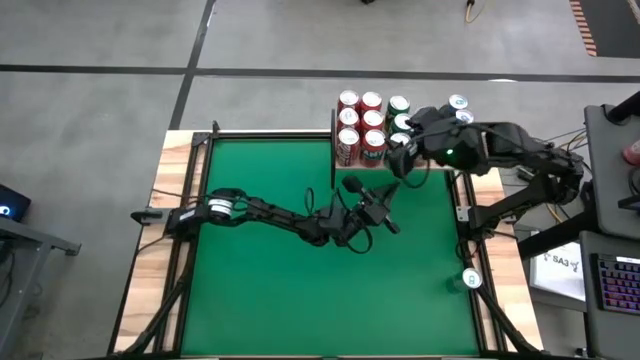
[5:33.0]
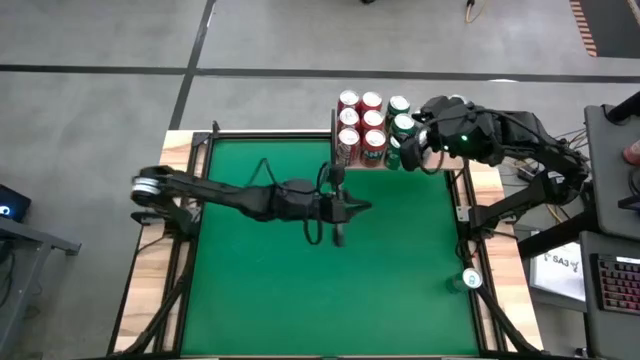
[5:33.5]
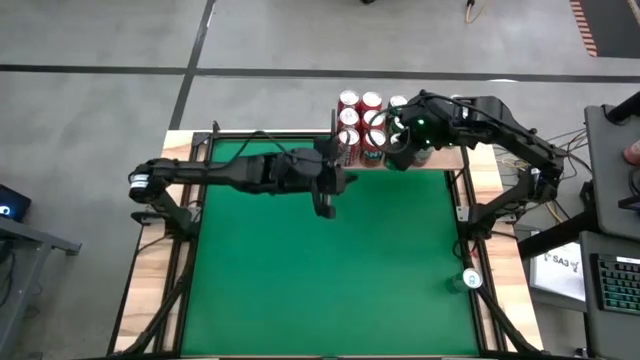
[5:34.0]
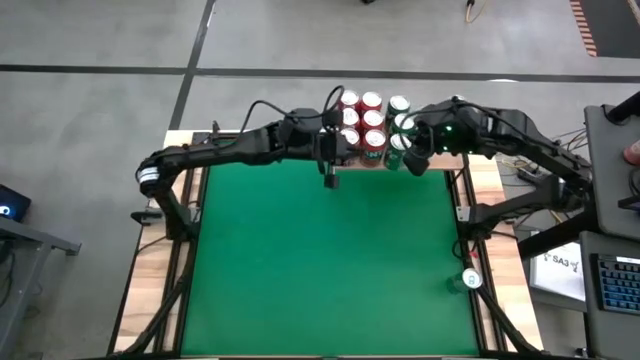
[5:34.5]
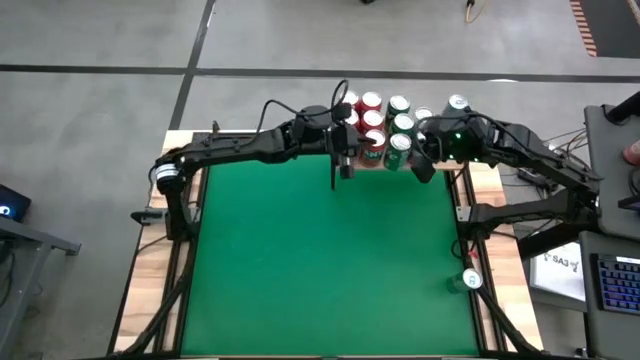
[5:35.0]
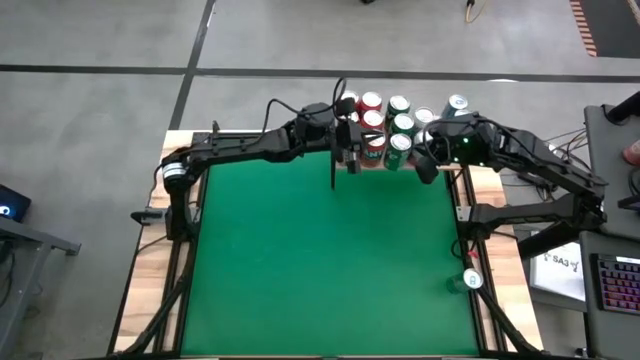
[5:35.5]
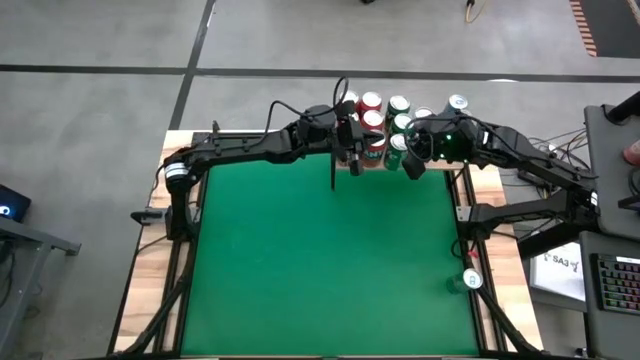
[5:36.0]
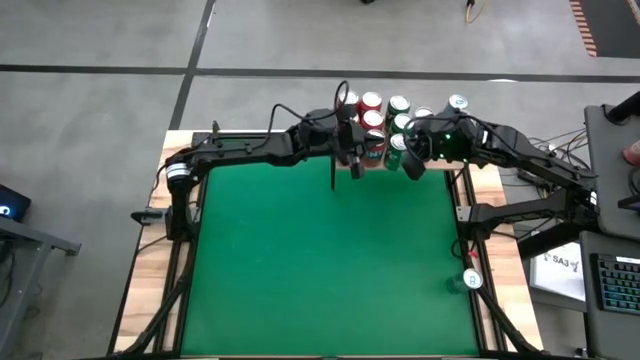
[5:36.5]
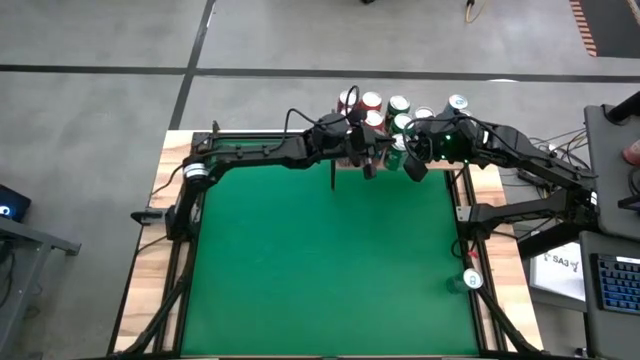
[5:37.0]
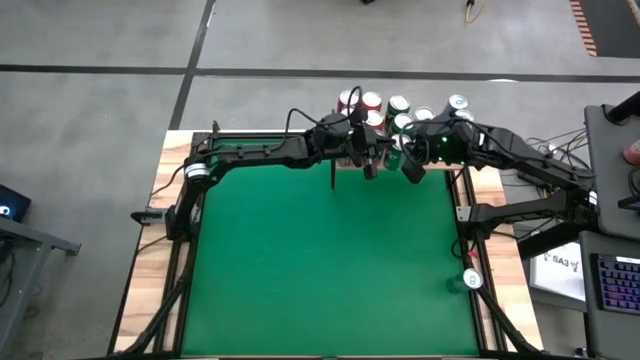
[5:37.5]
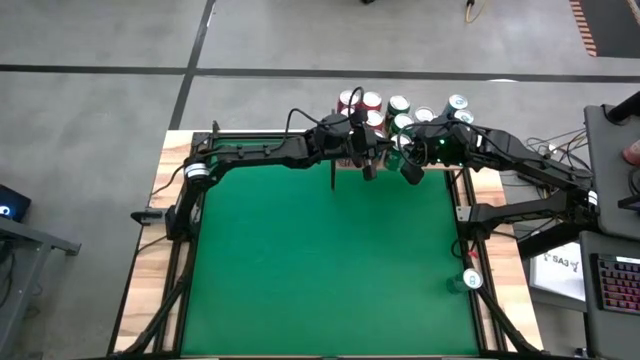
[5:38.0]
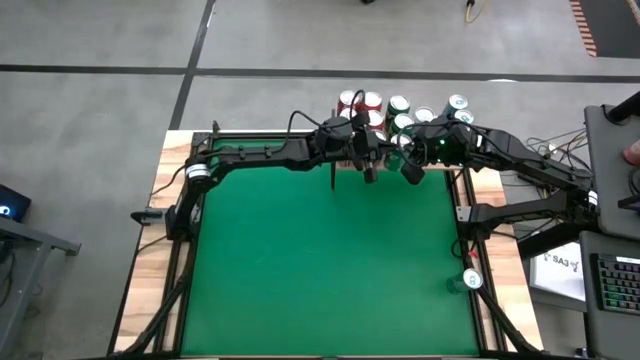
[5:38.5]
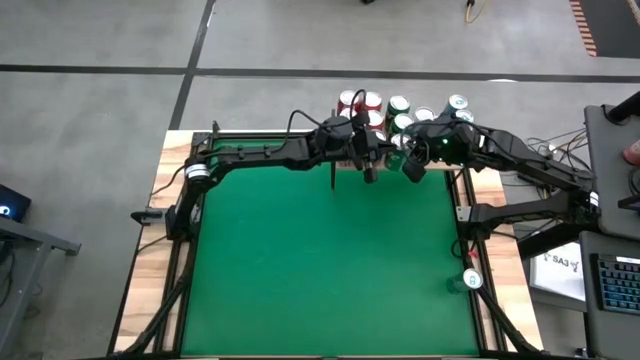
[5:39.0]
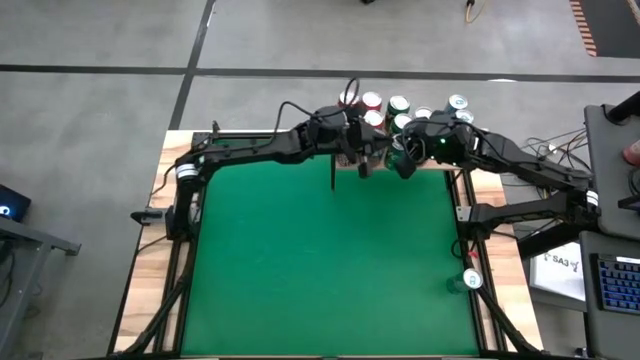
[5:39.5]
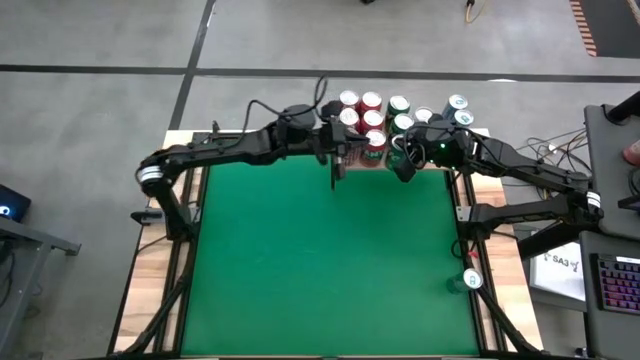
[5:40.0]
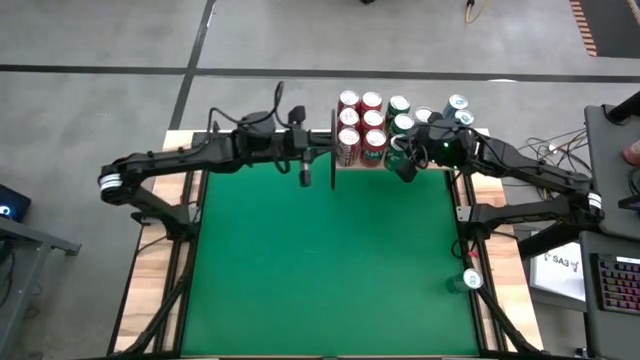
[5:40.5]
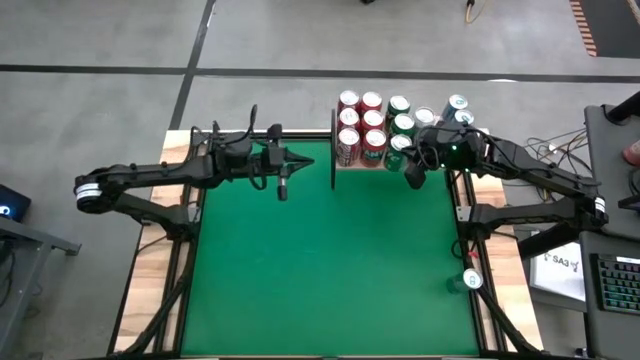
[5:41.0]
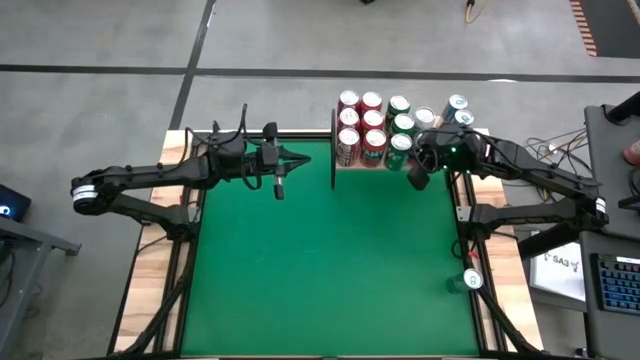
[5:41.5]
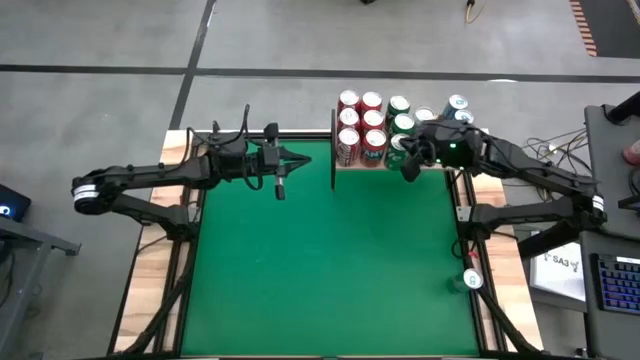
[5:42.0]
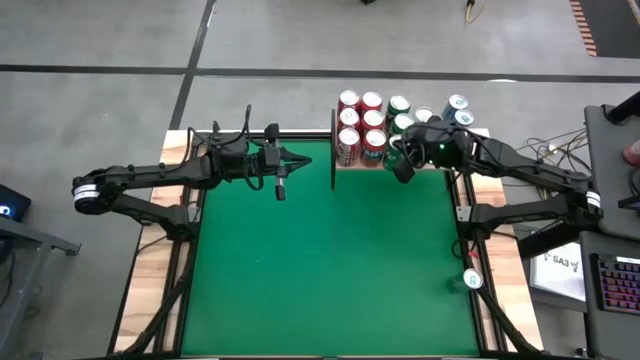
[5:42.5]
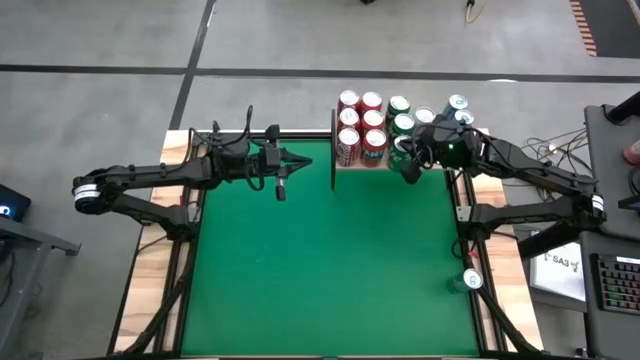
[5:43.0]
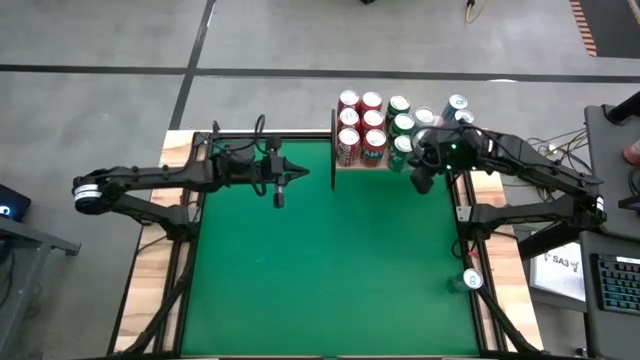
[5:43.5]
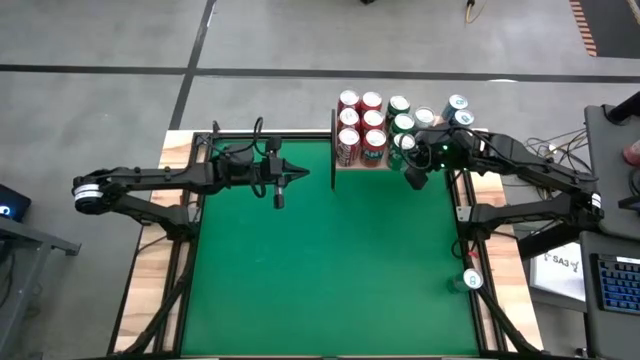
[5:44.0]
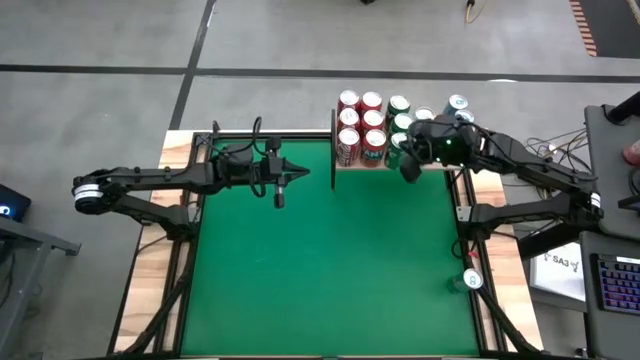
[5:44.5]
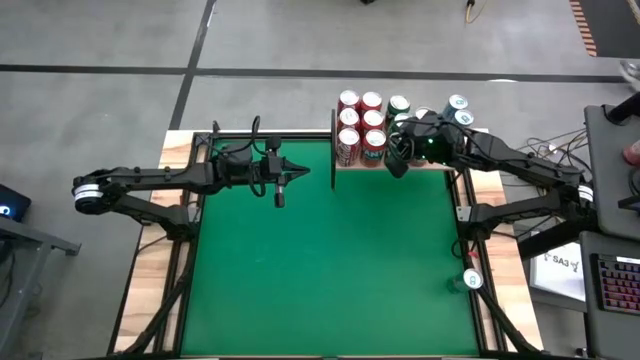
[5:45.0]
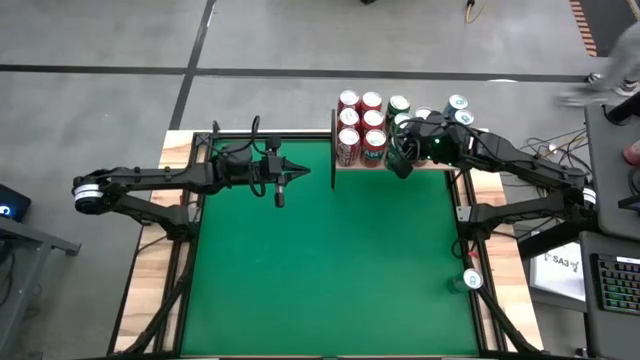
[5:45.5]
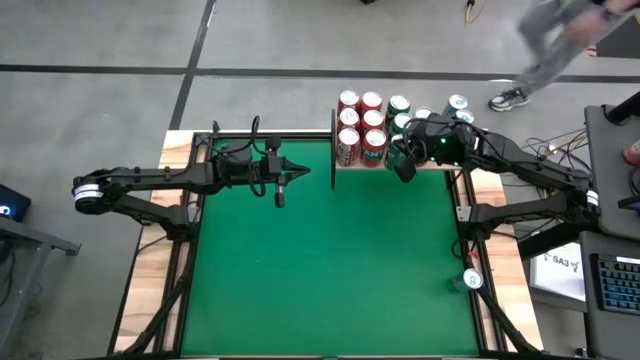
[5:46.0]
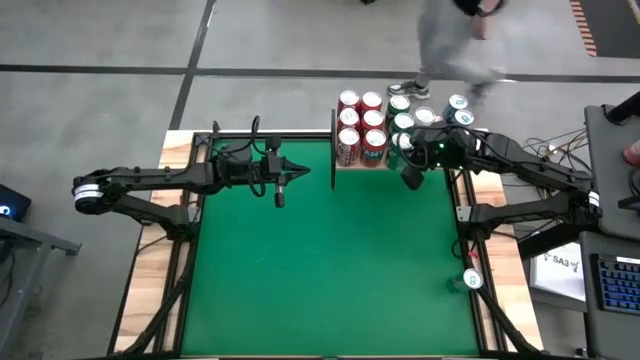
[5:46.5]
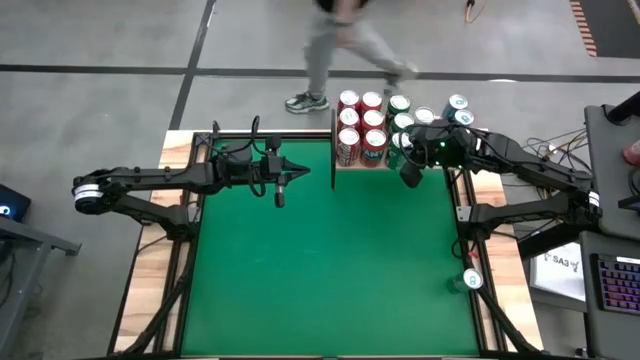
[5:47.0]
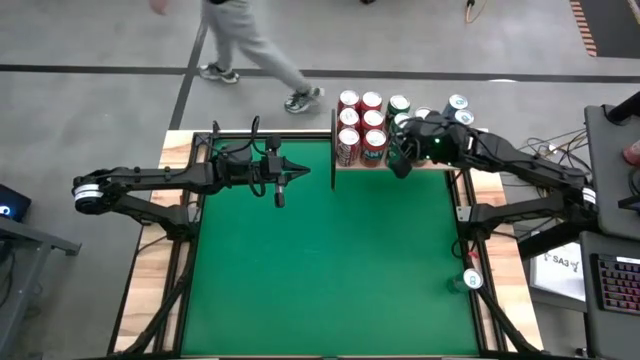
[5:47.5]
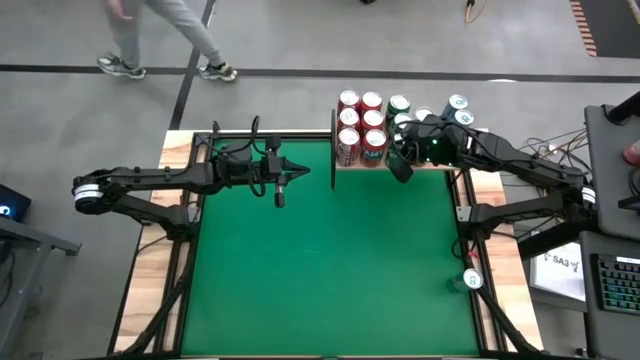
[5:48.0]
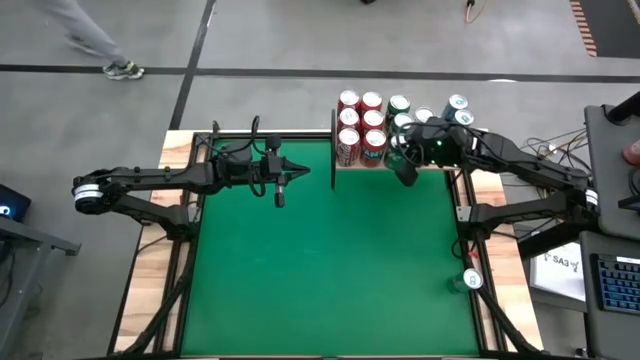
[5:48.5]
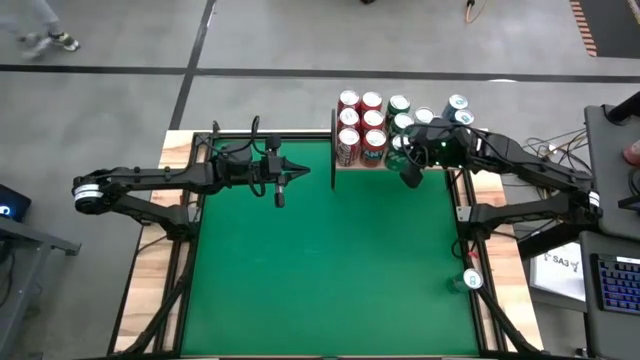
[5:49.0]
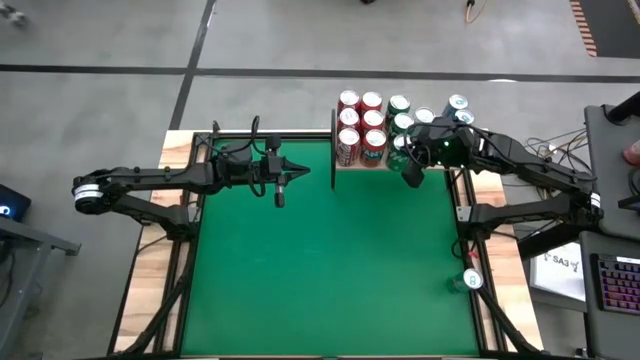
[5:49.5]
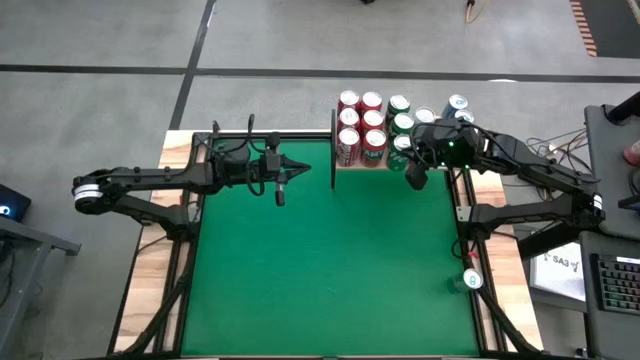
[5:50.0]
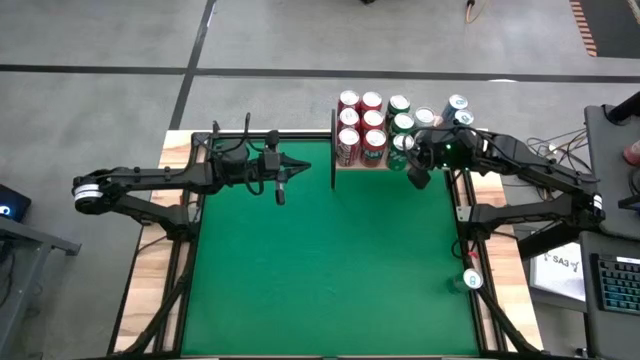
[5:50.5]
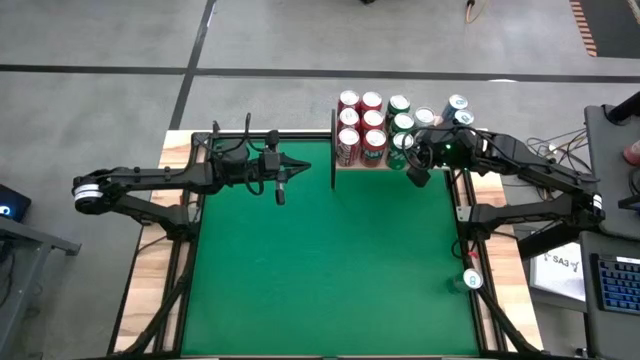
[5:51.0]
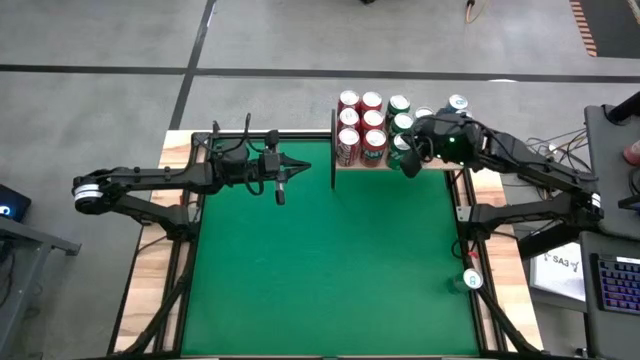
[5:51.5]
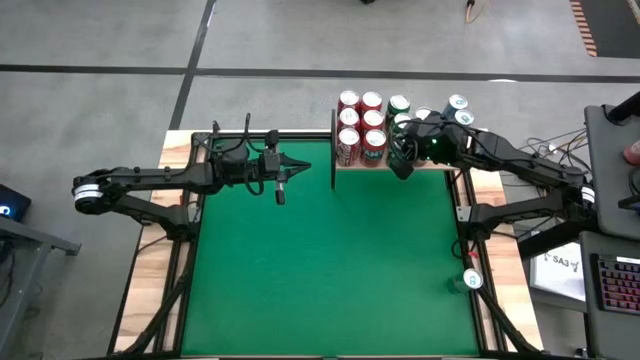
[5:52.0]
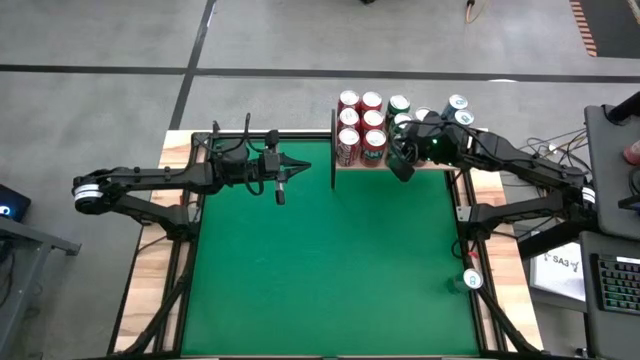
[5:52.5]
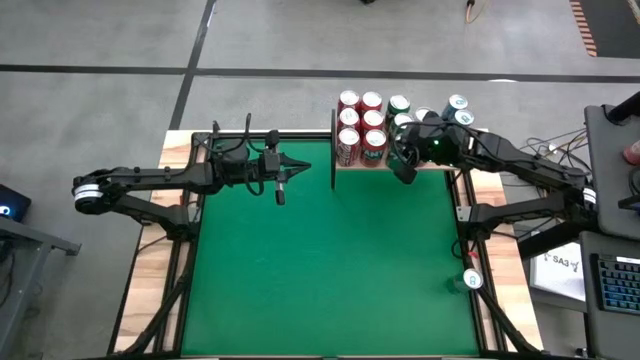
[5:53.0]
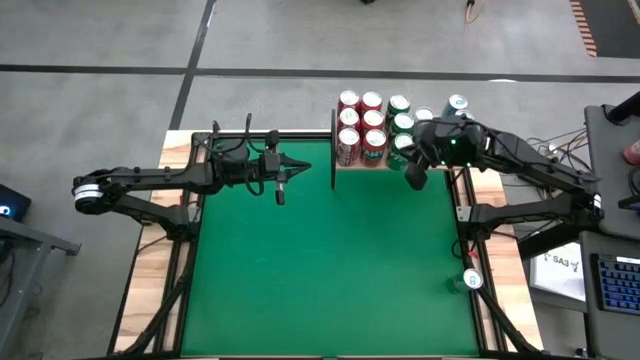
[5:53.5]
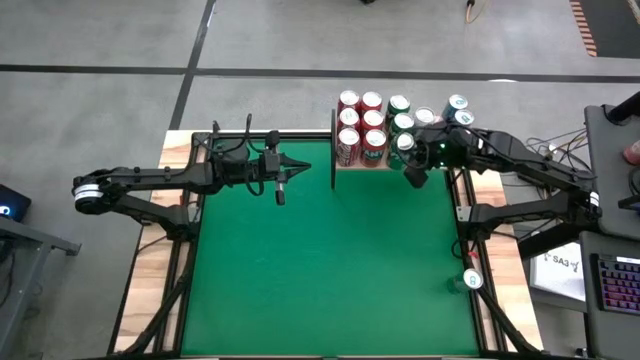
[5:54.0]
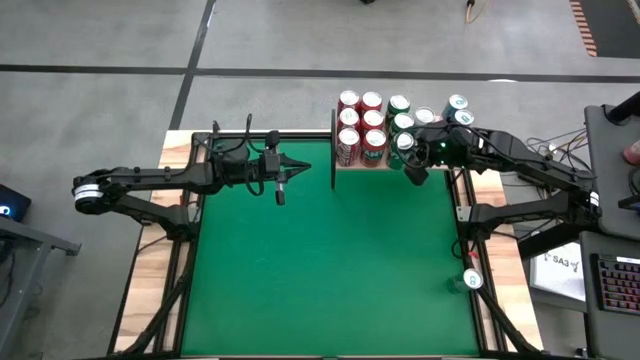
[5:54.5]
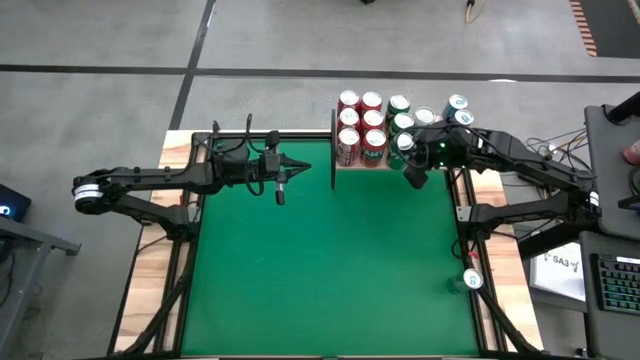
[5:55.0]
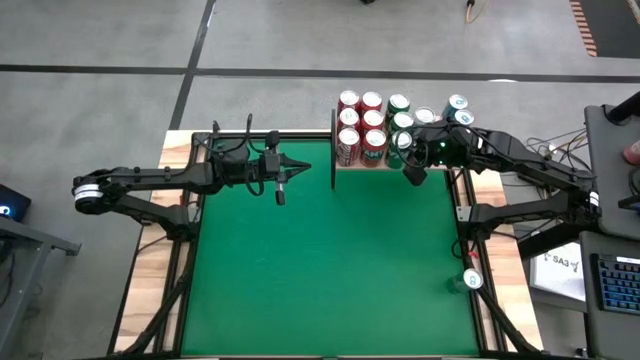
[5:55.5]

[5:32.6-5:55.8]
Task: Place canned beverage on shelf
Put the green soda can on the shelf aligned with the other green soda cans
